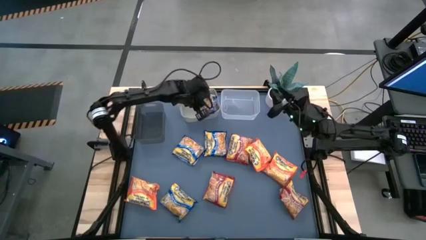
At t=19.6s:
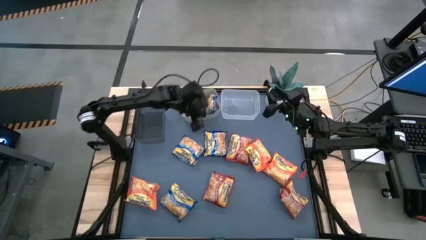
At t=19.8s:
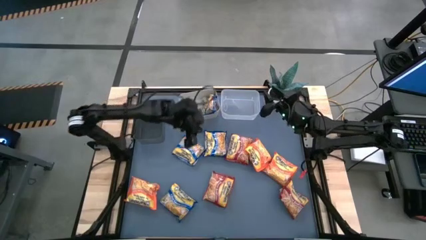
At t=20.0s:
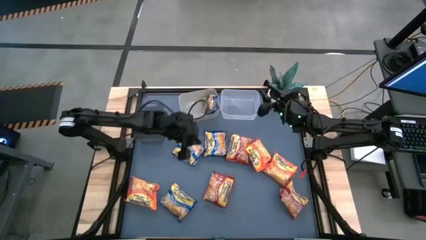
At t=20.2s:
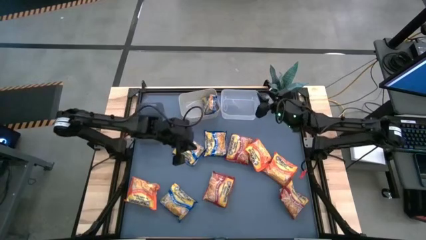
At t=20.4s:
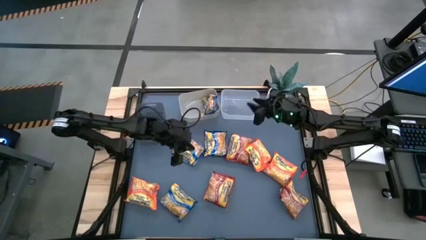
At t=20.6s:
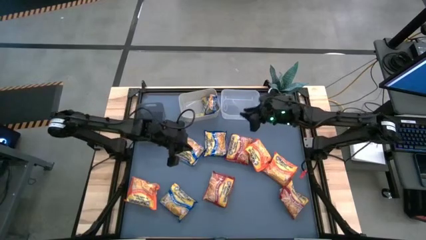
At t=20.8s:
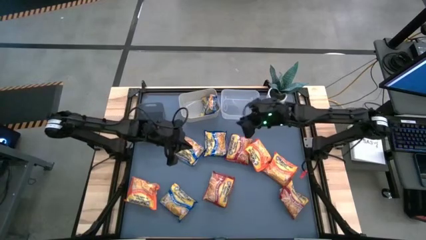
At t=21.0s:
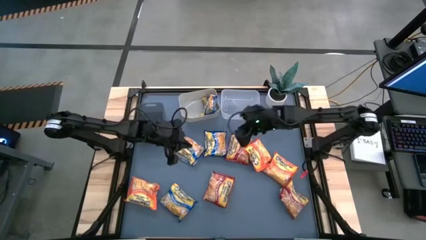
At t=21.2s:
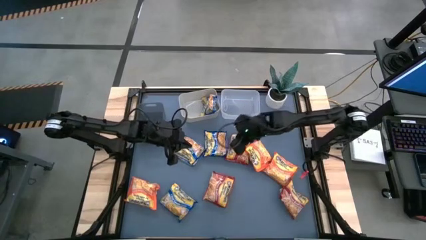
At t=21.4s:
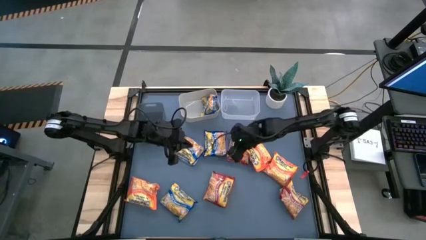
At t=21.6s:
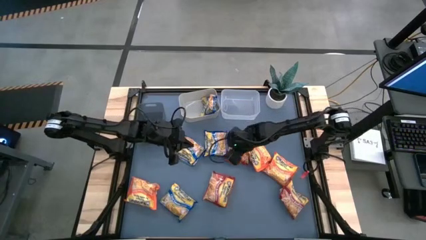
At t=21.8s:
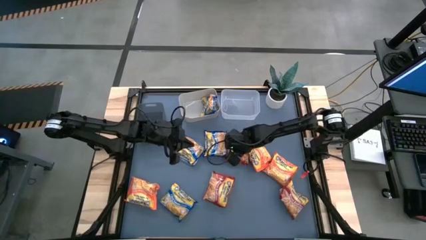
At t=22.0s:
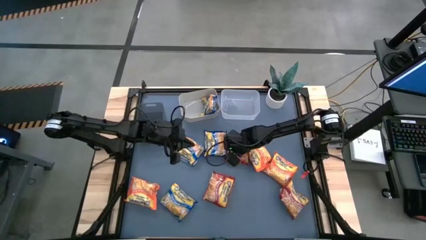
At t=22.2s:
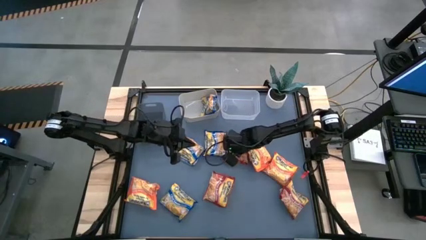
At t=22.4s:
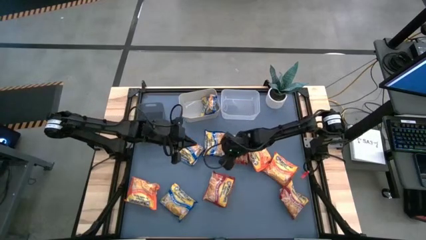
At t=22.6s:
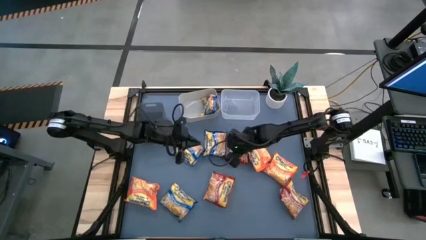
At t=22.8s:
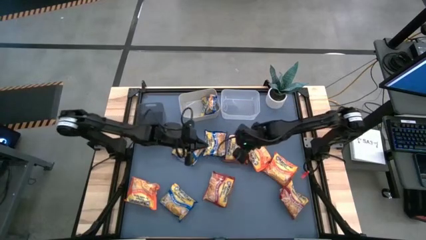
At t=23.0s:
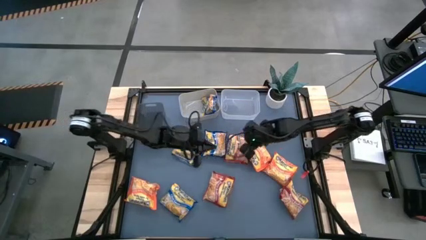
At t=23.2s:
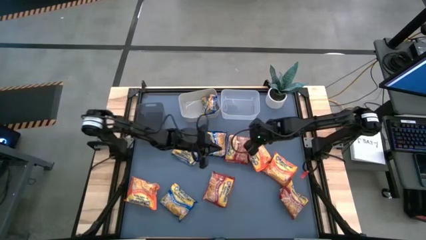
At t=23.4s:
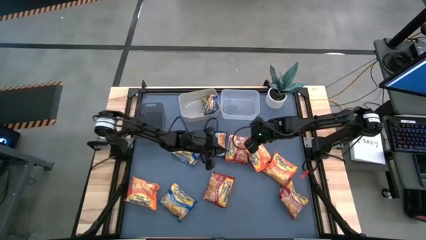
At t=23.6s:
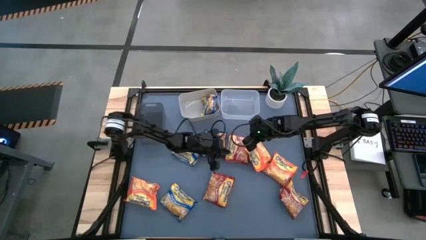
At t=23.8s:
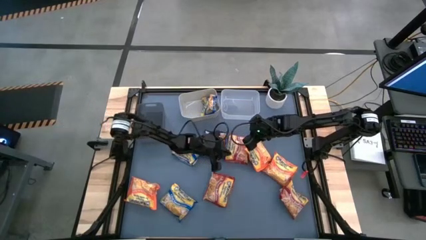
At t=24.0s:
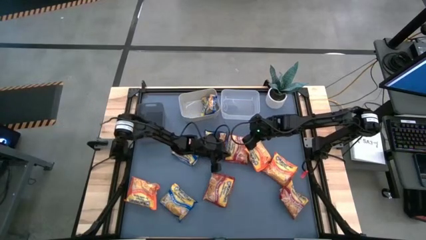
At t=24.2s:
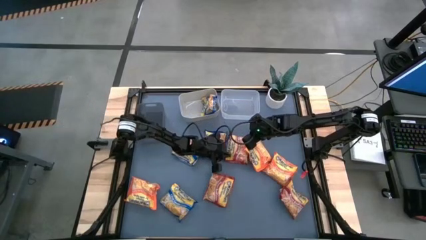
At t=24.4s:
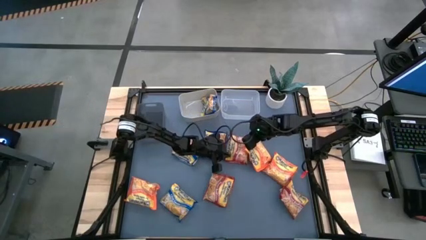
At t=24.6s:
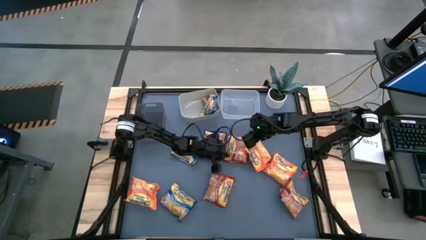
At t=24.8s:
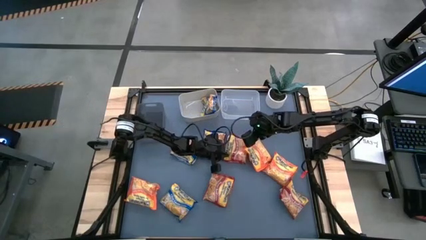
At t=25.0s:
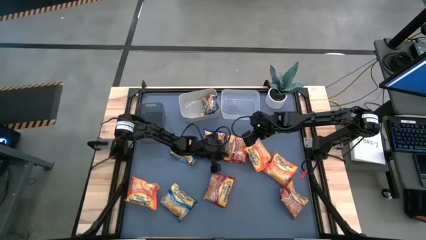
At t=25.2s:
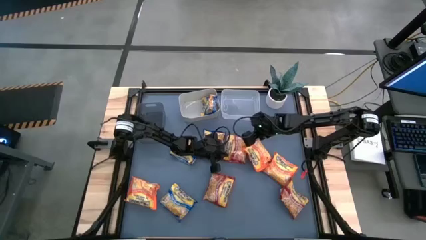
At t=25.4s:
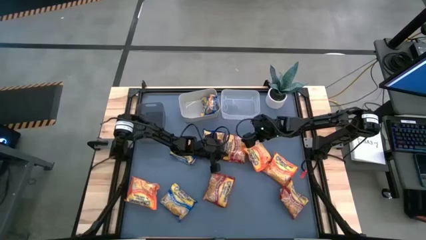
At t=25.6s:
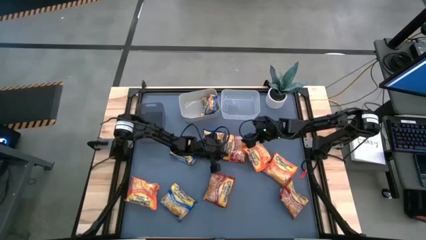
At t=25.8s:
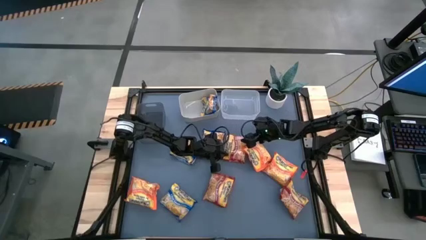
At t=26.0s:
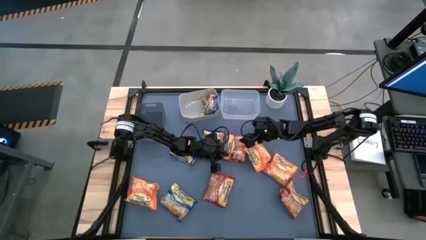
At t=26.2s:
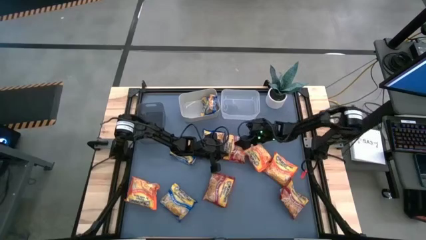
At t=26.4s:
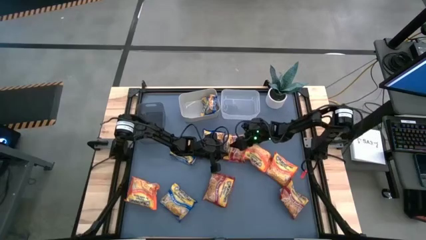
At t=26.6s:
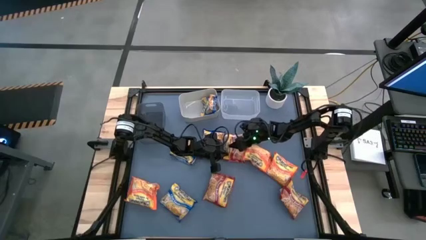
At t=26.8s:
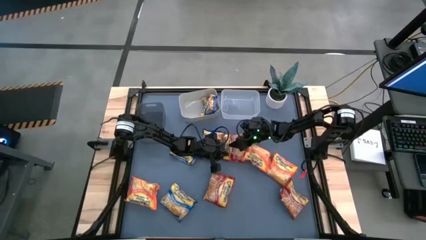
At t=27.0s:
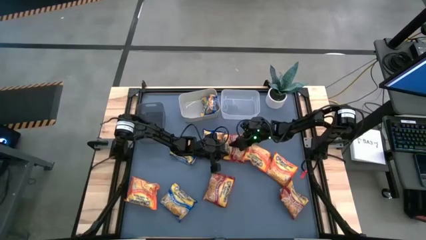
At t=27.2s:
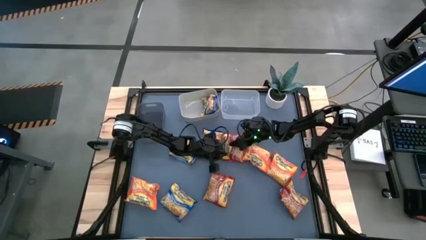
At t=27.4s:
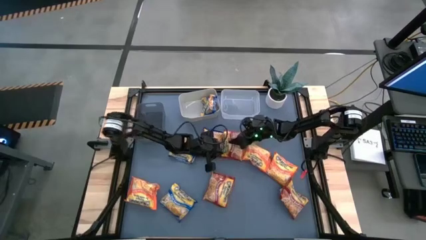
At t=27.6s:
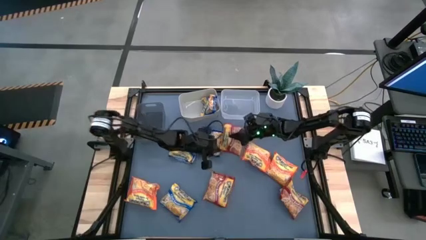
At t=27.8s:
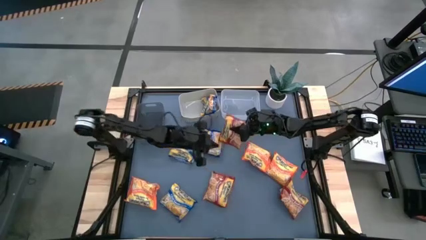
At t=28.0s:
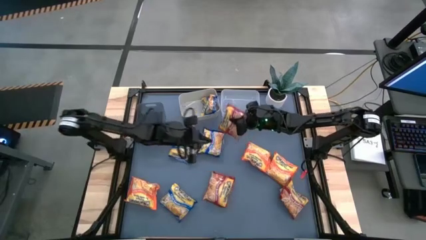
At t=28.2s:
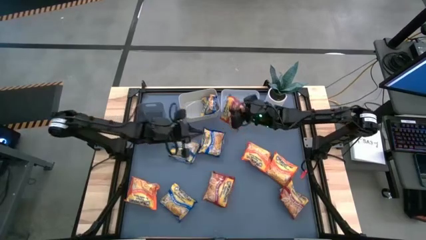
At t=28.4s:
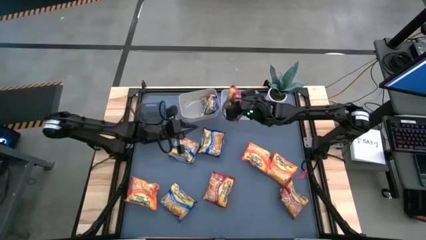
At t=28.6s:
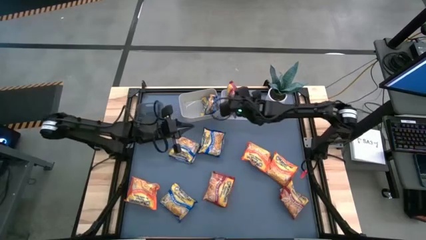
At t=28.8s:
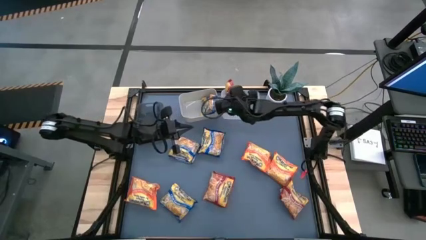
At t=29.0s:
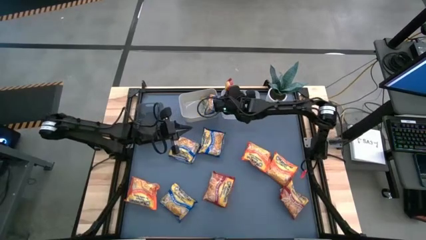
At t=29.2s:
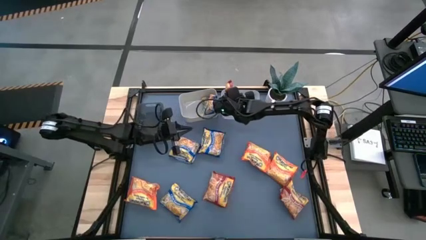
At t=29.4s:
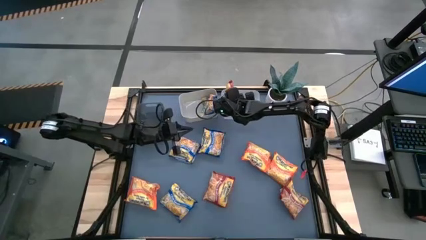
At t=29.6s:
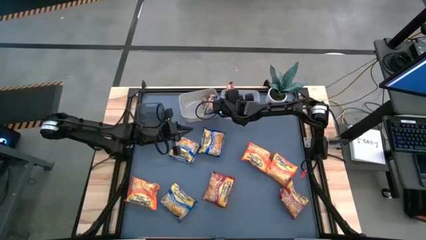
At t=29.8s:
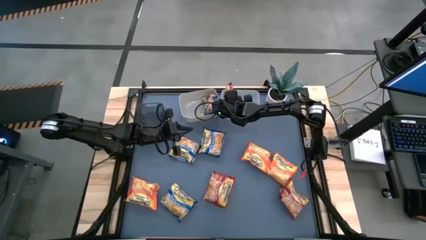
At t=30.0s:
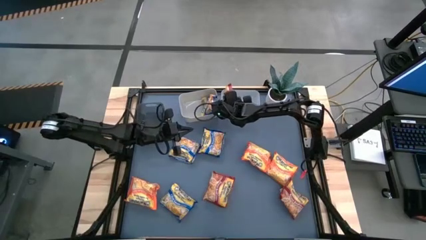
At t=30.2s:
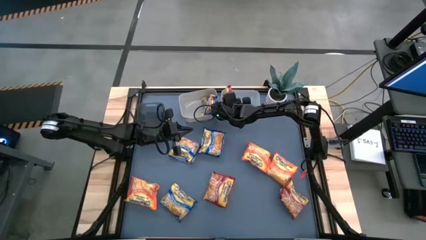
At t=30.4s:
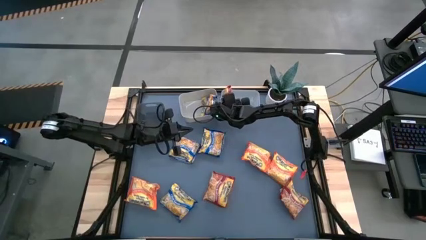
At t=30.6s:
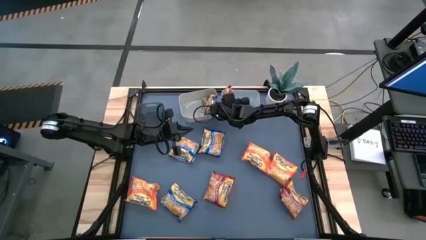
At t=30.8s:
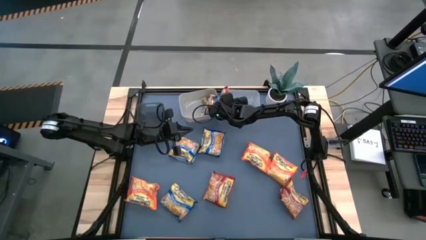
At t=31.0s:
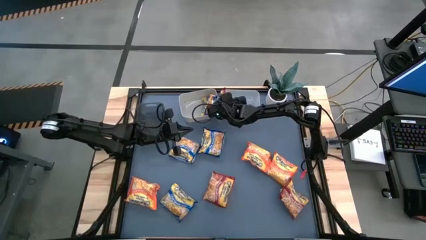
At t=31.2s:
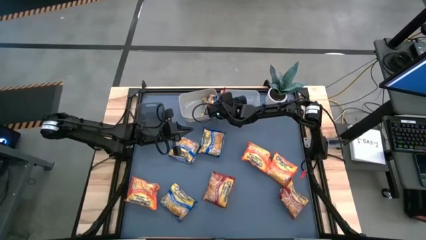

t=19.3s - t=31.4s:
Task: Sort Maruchan noodles
Put the red noodle pack into the transparent bin

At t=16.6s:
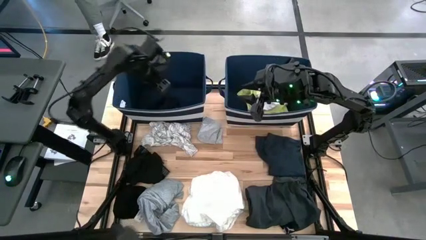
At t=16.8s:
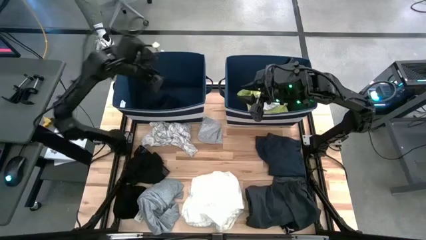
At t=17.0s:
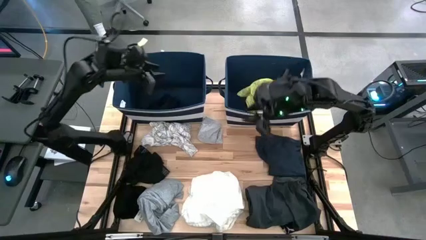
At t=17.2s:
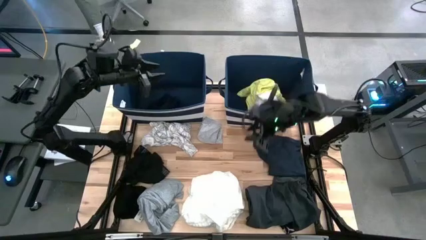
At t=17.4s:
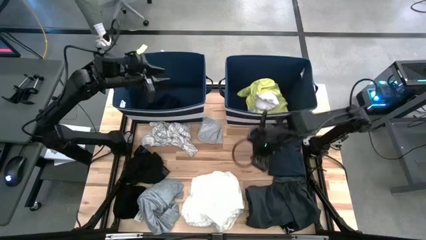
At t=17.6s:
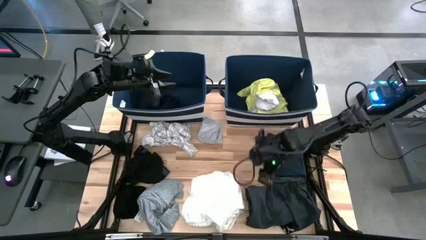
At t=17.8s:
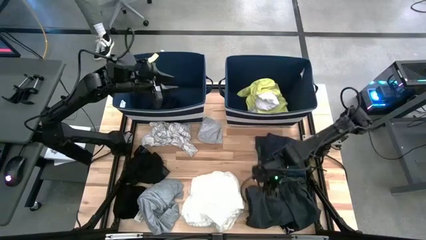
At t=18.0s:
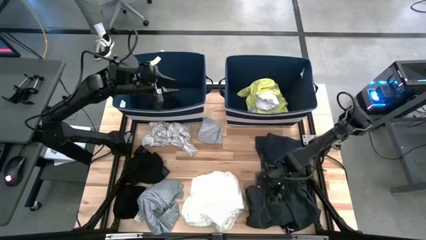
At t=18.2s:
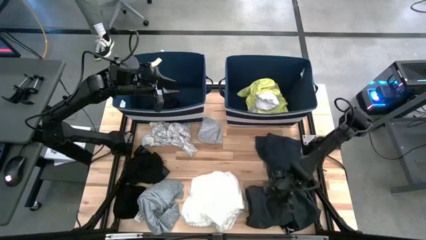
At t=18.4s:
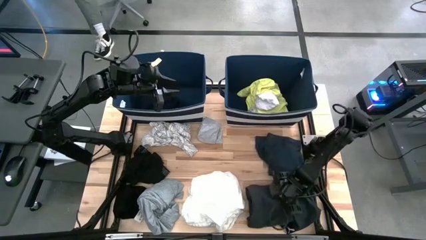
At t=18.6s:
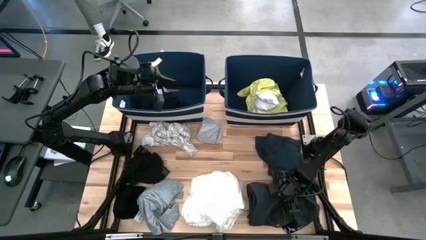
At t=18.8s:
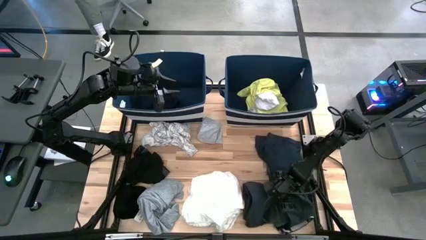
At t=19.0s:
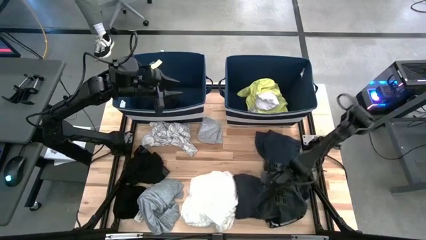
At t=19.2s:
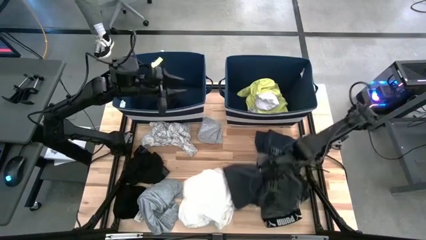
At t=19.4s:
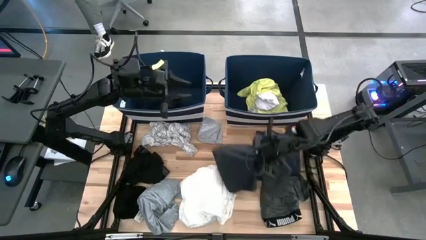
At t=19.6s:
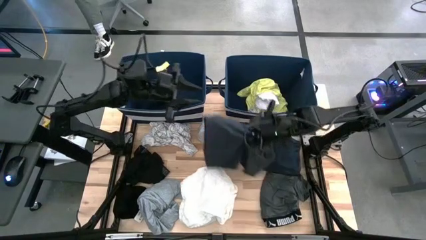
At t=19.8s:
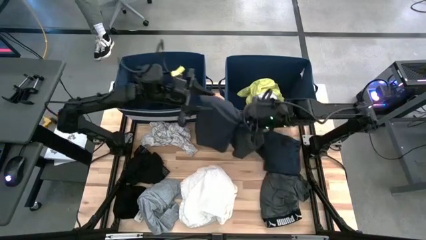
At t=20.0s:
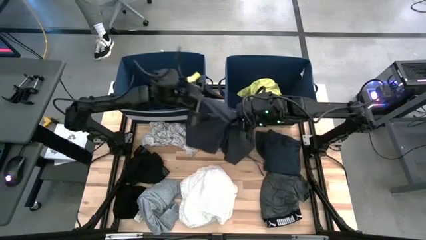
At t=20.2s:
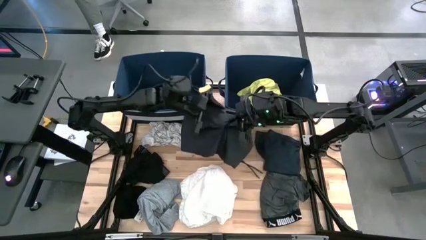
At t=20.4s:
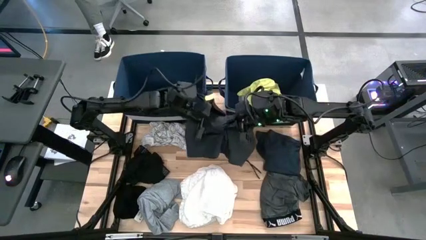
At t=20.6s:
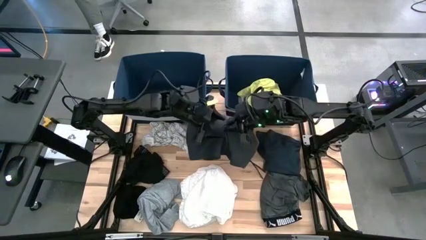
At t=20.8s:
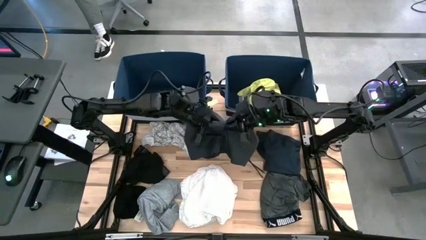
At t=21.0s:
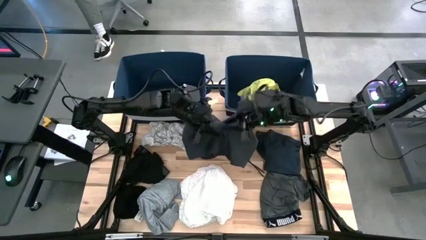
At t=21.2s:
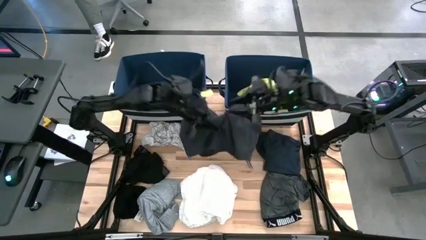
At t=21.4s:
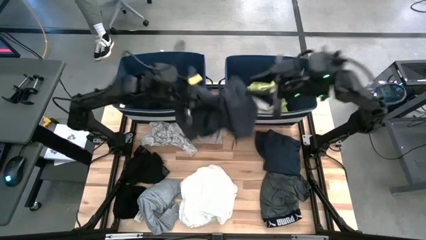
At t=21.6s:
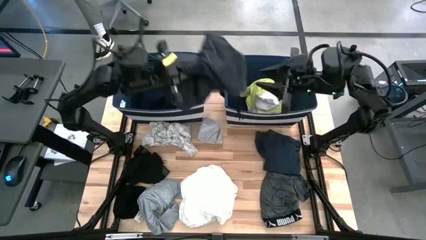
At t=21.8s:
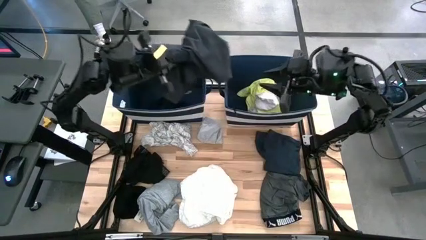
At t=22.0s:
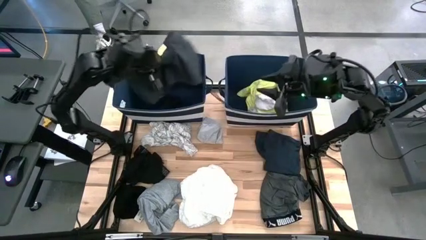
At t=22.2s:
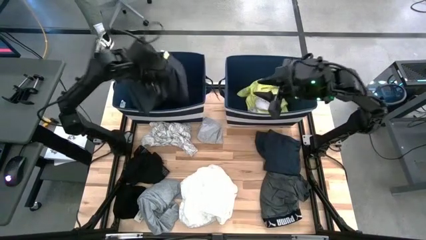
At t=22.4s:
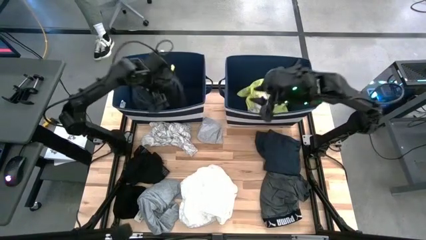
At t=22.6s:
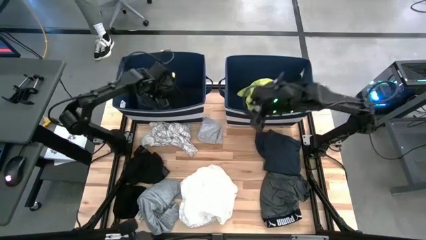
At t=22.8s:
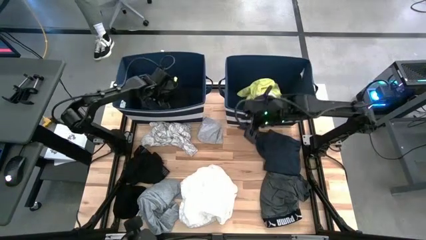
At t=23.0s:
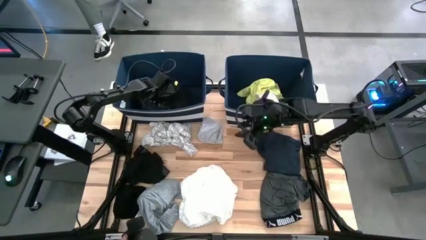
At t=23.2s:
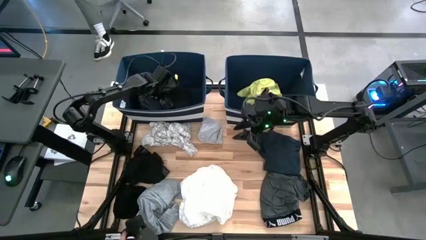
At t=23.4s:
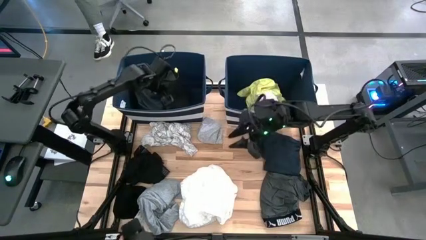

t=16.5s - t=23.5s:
Task: Sort clothes
Put the black pants into the left blue laundry bin
